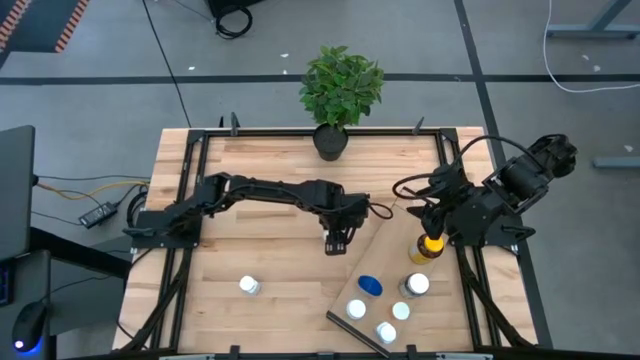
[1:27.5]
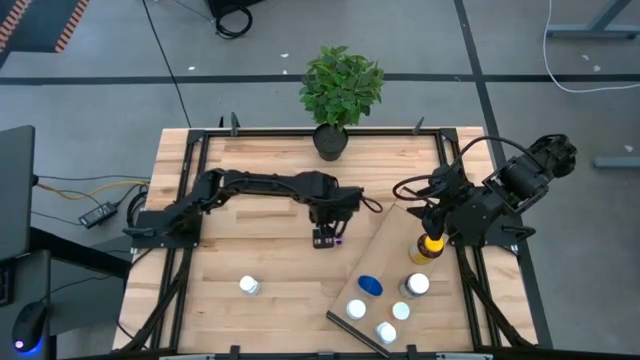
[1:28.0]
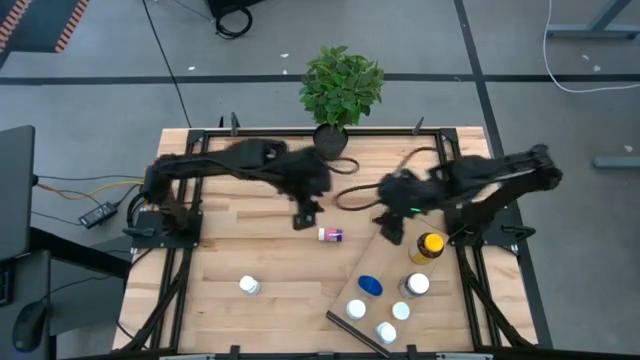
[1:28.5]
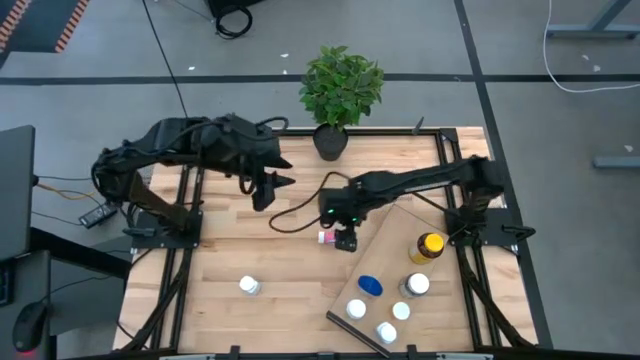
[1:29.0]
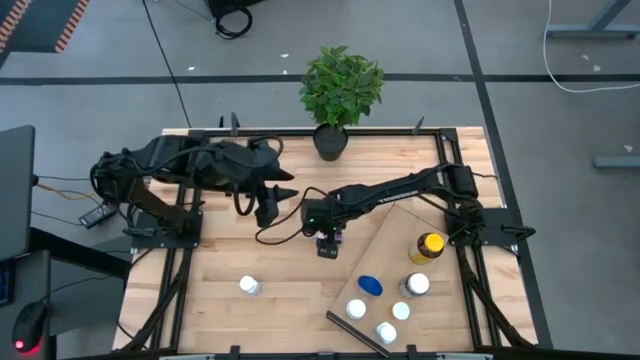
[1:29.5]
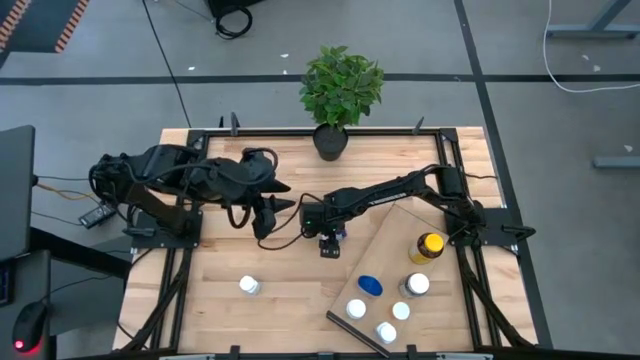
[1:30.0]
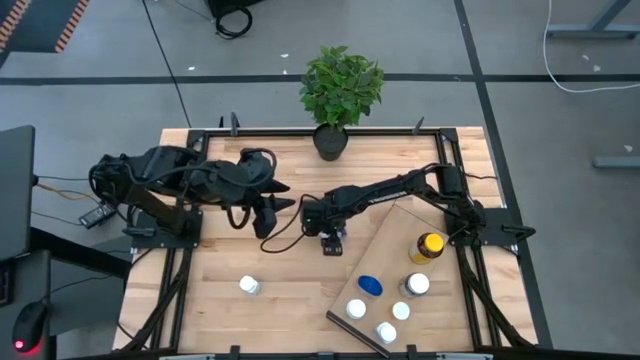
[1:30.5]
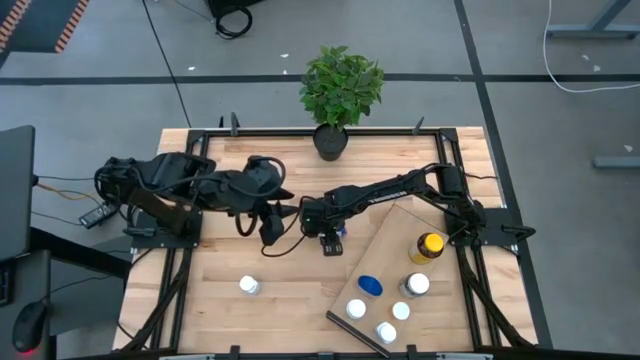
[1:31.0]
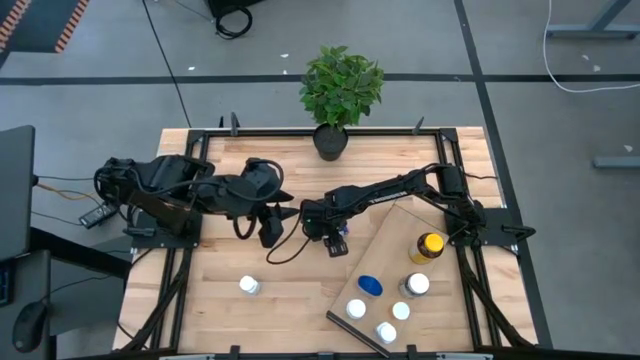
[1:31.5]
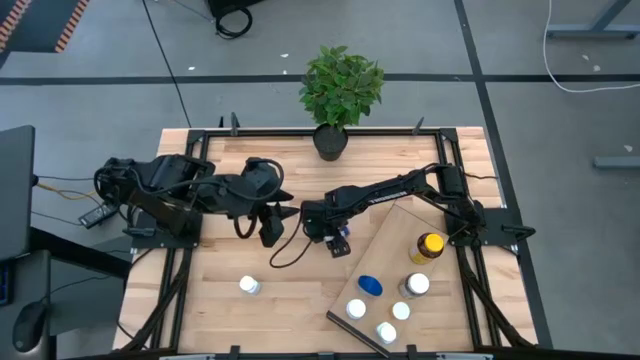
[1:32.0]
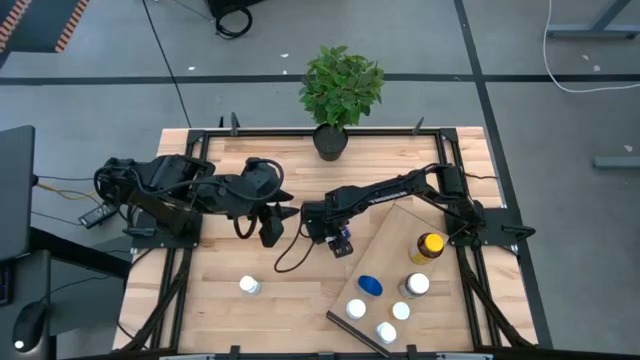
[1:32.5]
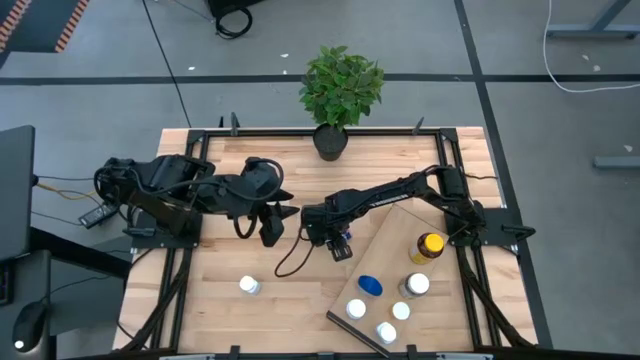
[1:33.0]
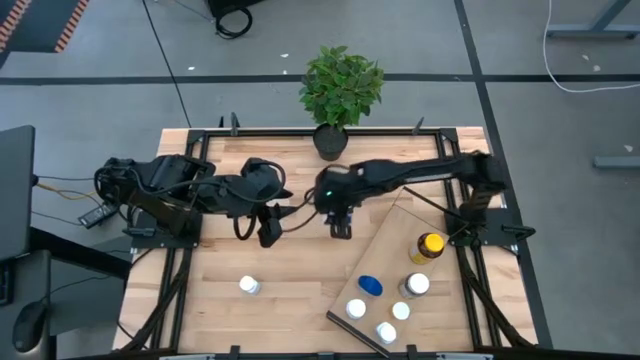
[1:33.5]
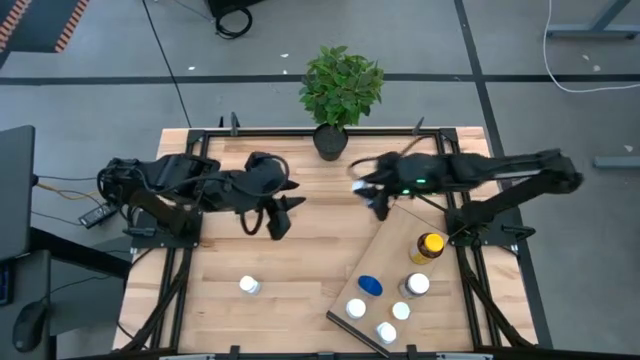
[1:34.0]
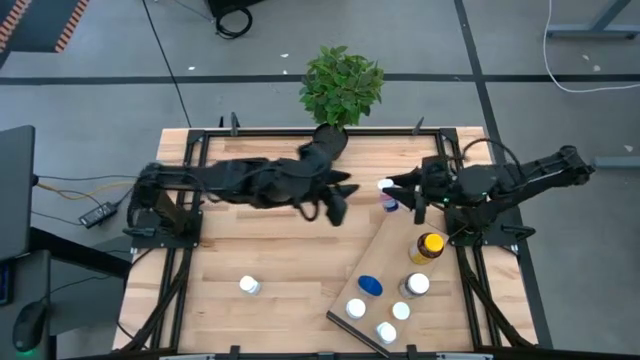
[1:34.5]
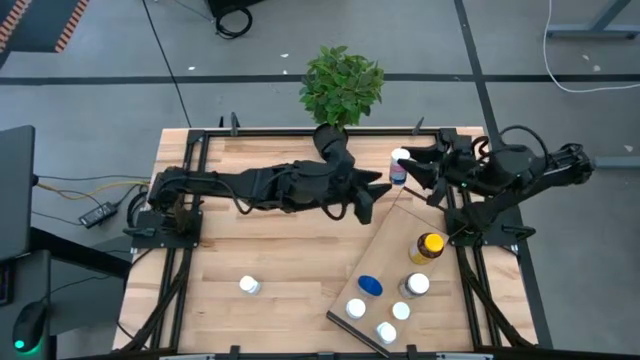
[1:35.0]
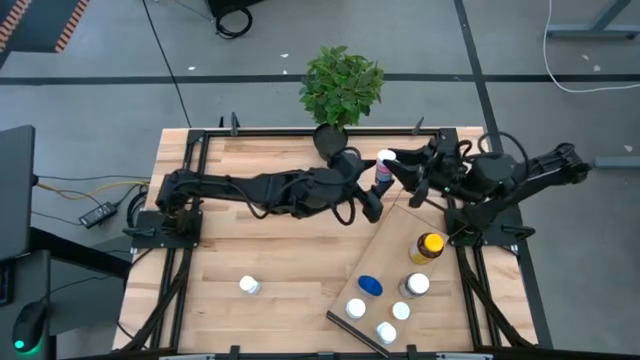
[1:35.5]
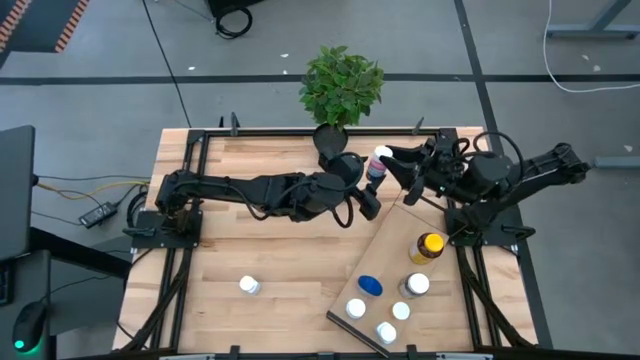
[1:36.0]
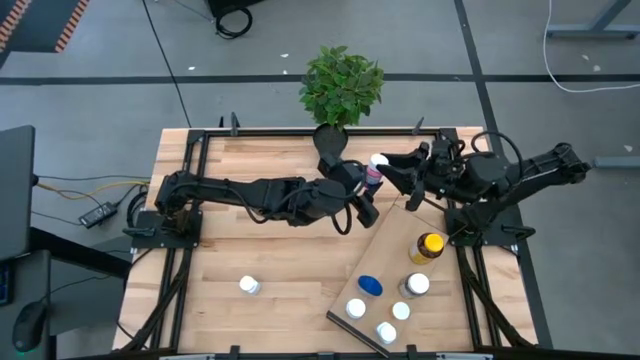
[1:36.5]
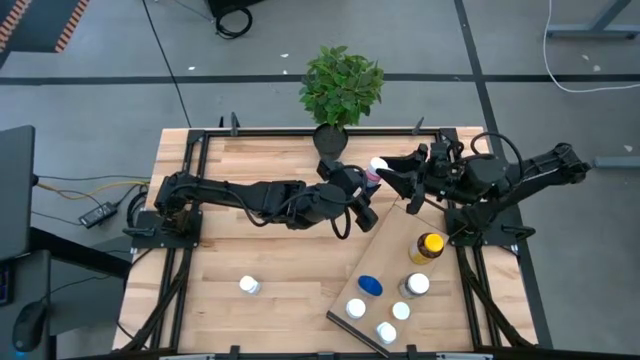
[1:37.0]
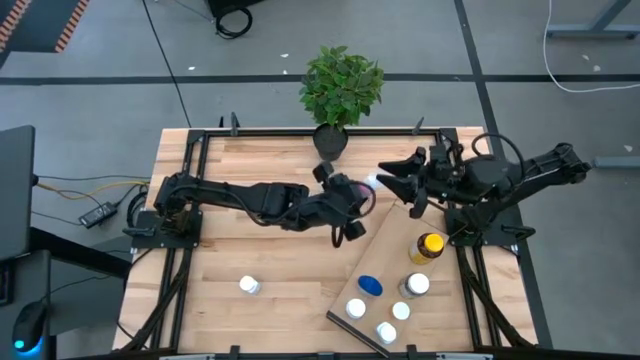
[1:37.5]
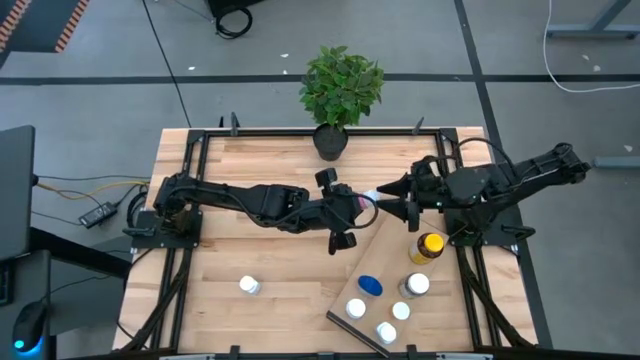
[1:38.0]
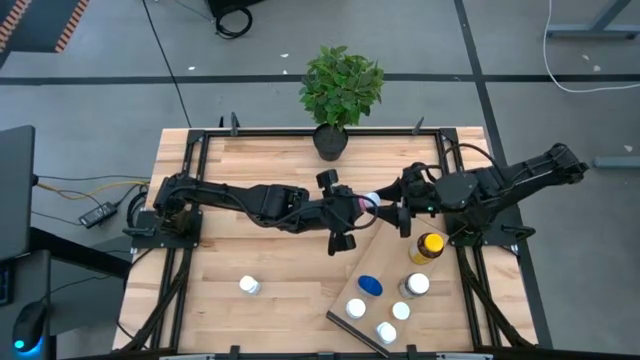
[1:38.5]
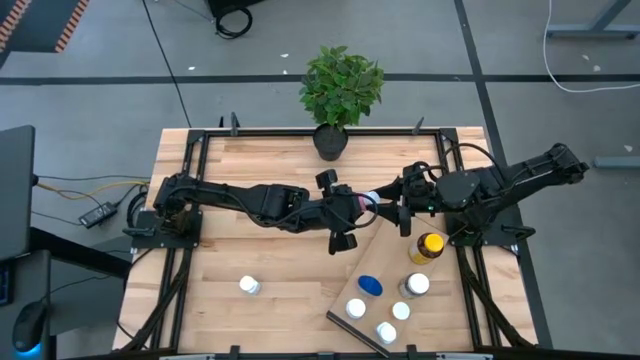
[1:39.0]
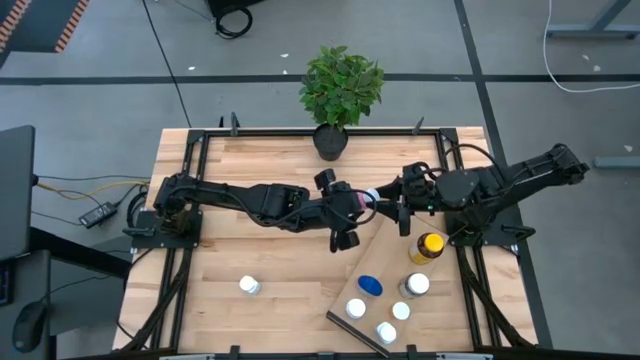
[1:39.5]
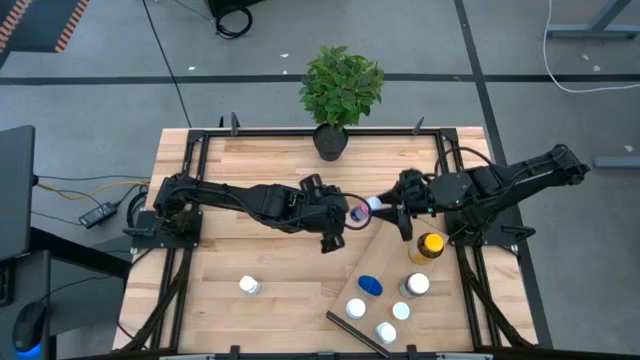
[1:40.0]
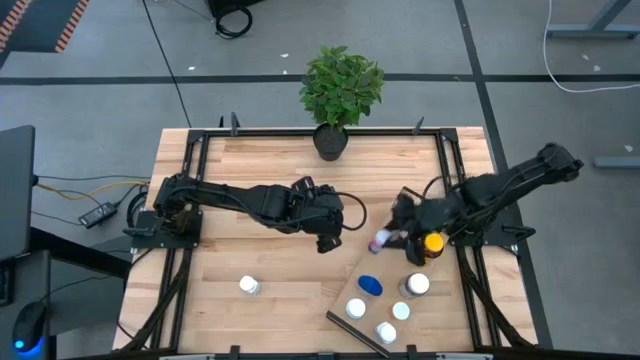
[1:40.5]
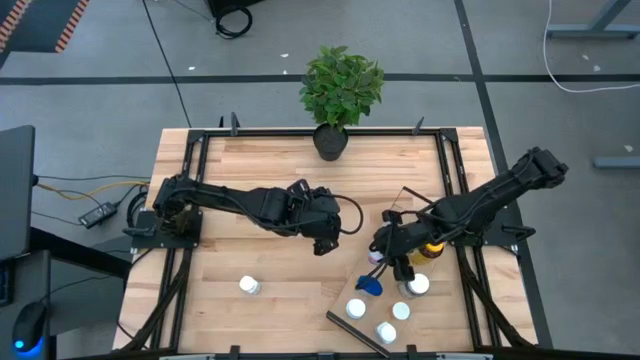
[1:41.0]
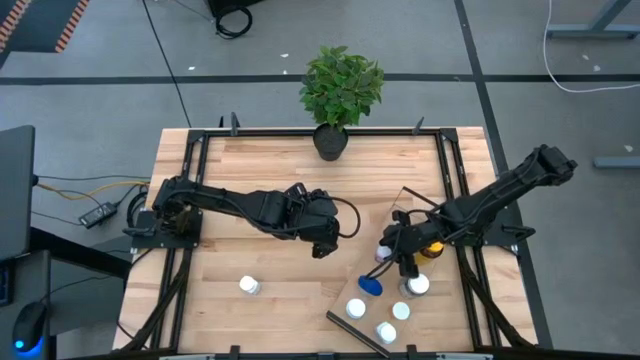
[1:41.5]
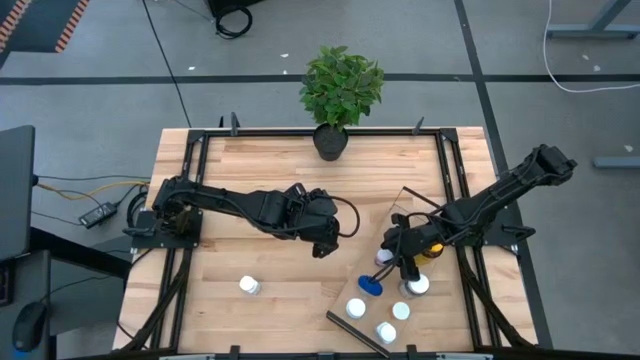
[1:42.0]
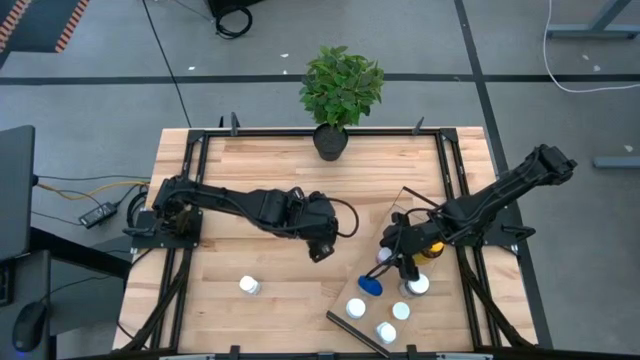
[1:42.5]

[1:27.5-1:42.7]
Task: Pick and place medicine bottles onto shelf by color
Put the pink medicine bottle on the shelf

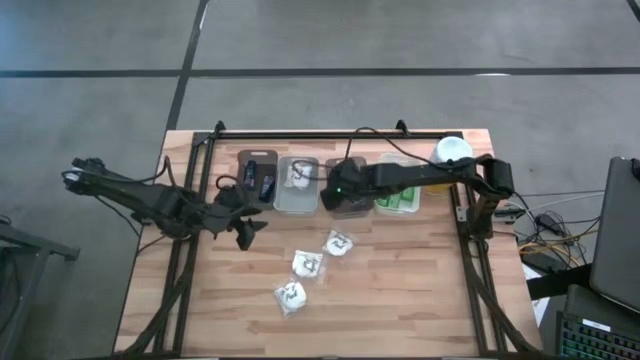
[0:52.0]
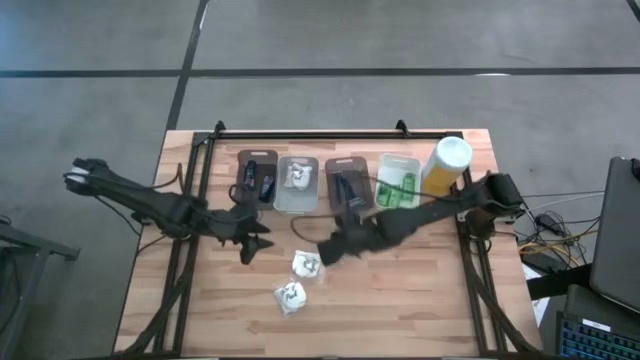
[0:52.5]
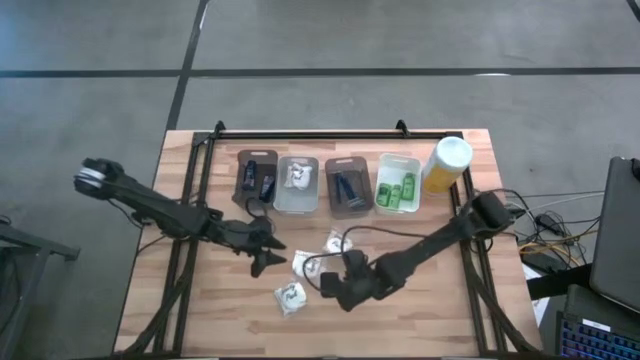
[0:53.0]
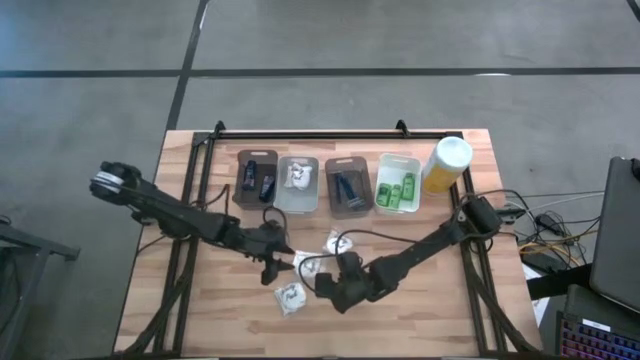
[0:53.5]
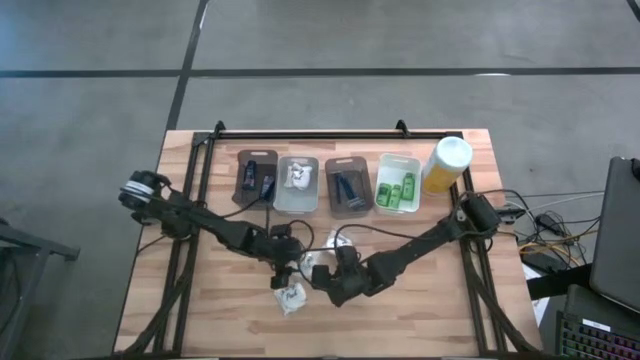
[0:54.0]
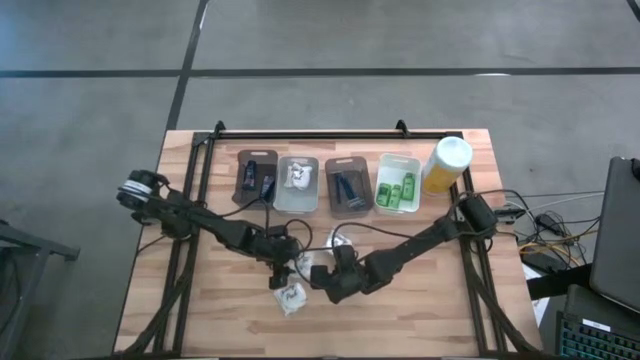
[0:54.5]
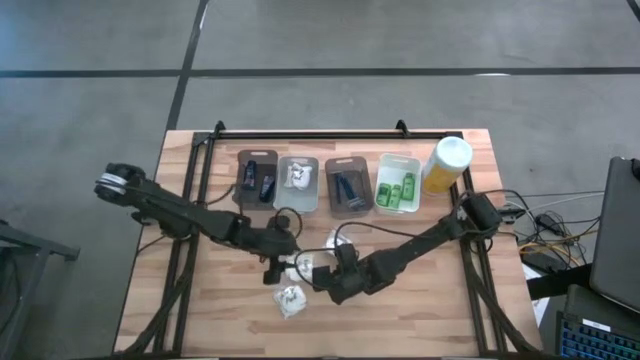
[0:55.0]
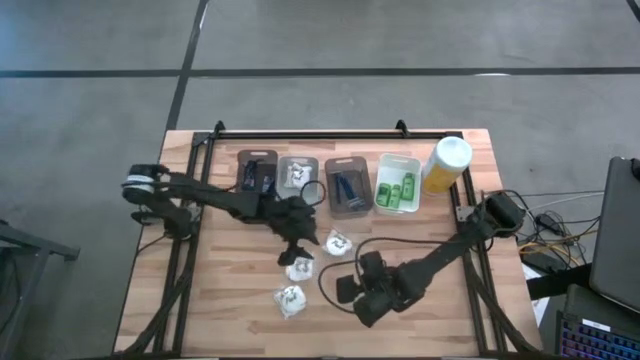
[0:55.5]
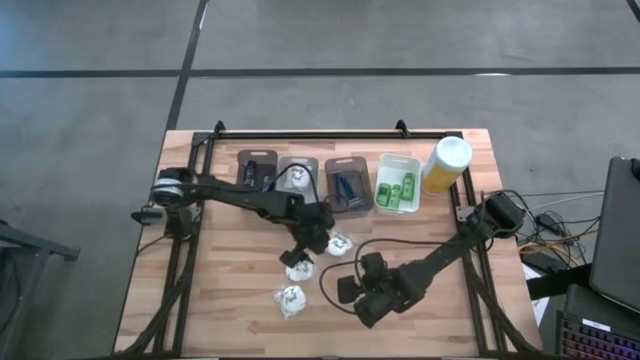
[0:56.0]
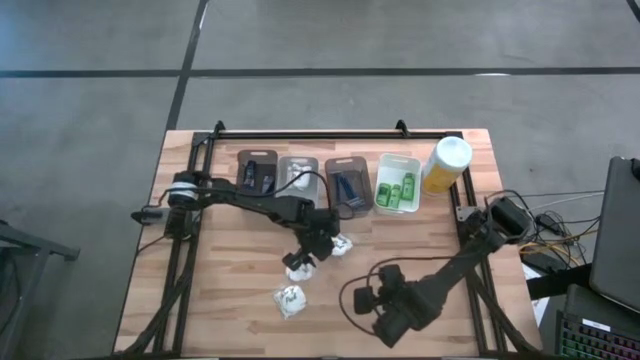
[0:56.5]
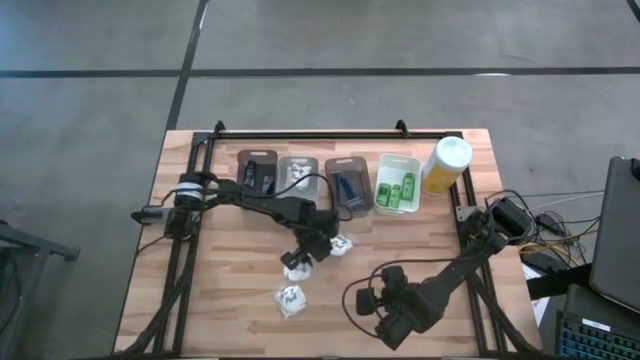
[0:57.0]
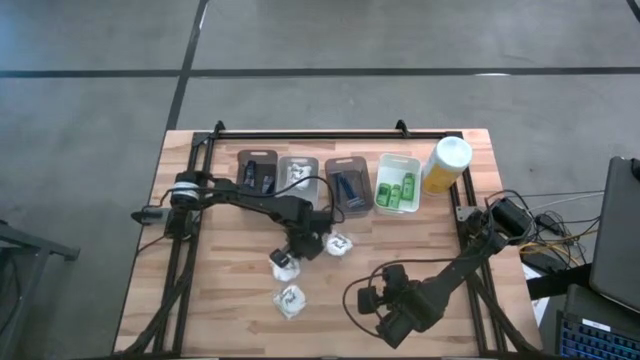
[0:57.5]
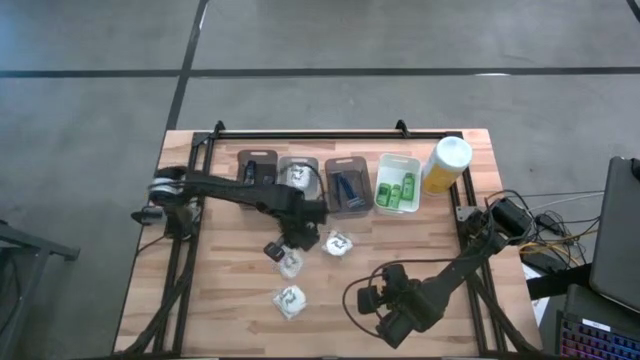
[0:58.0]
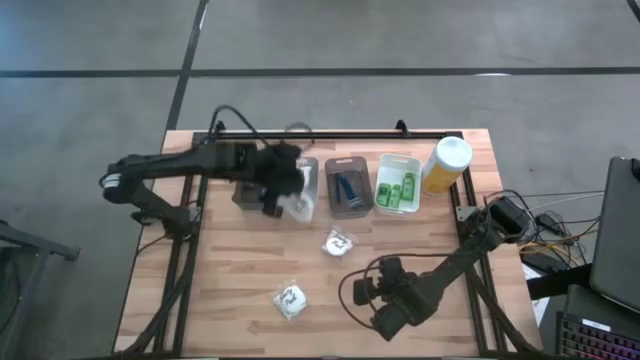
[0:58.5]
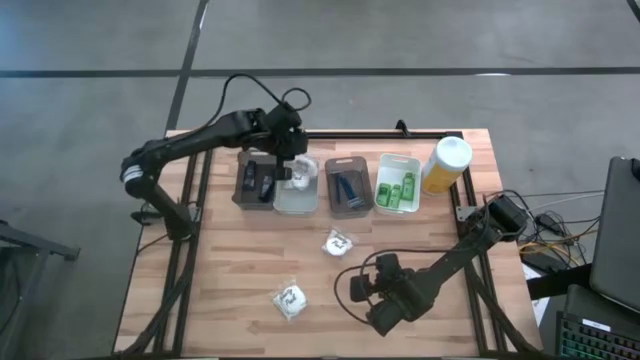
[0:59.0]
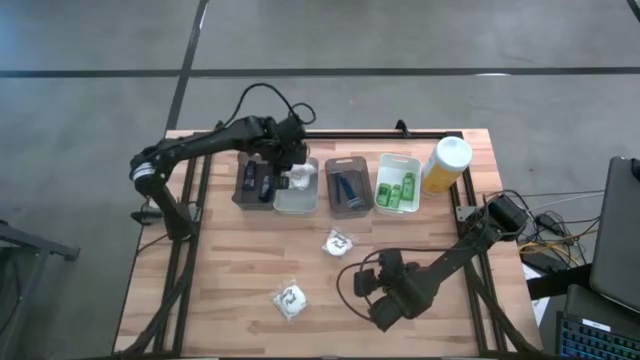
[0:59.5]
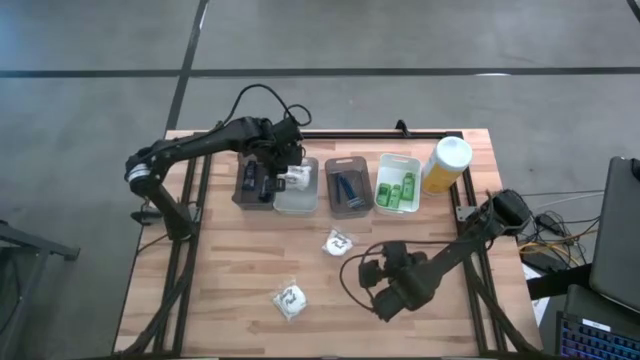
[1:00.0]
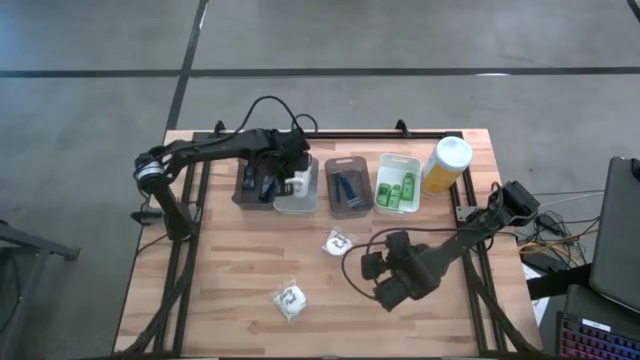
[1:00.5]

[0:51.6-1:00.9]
Task: Pick & Place Travel size toiletries
Put the white cotton pack into the gray bin
